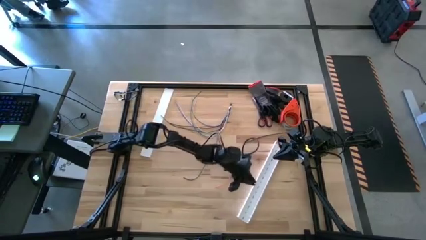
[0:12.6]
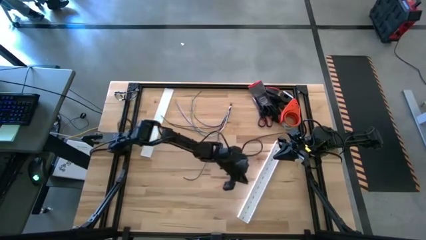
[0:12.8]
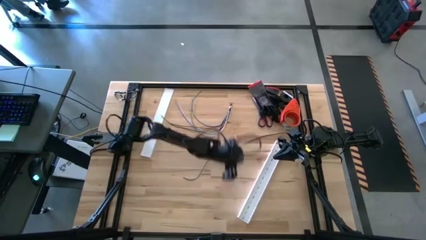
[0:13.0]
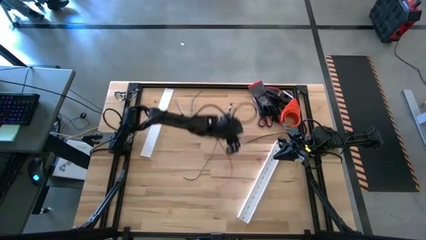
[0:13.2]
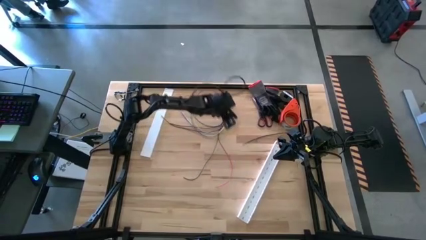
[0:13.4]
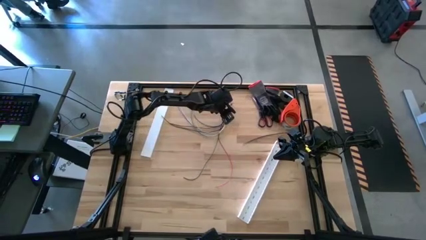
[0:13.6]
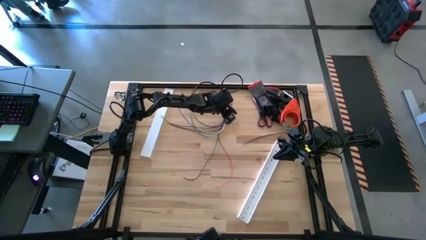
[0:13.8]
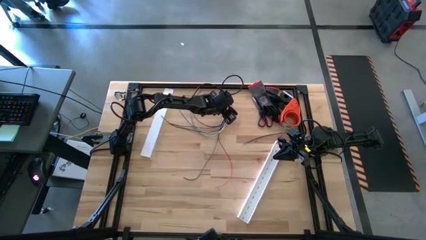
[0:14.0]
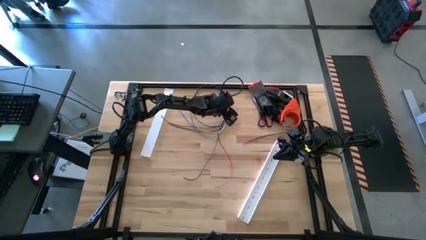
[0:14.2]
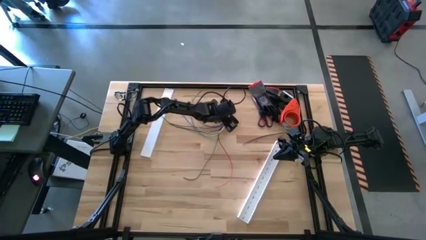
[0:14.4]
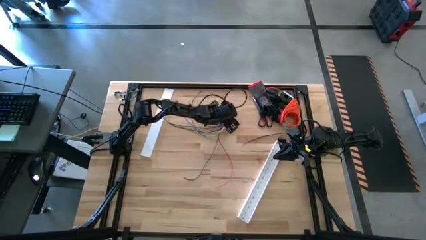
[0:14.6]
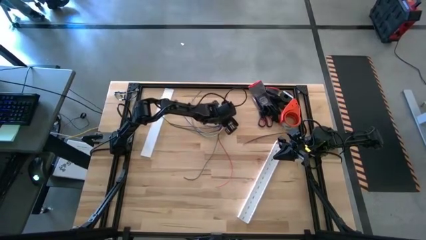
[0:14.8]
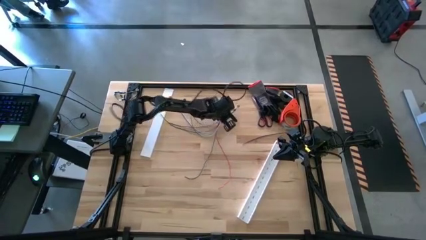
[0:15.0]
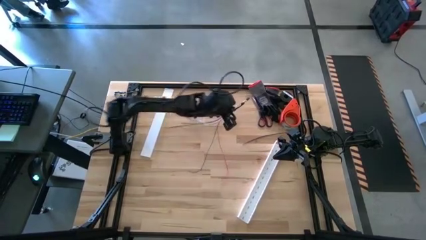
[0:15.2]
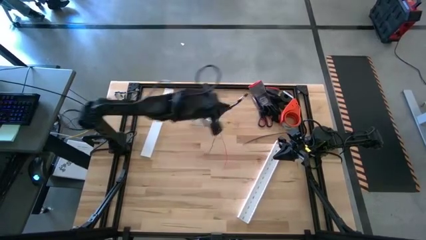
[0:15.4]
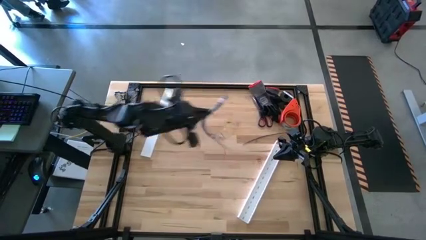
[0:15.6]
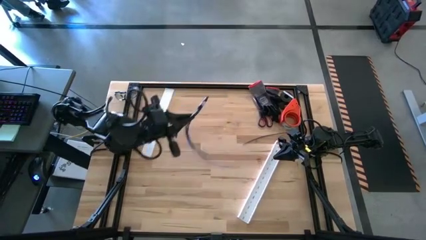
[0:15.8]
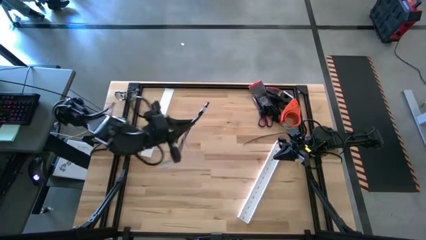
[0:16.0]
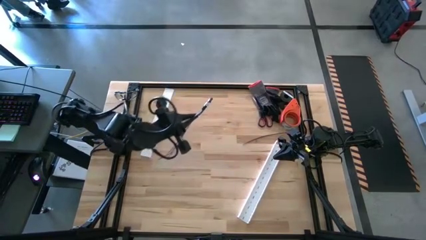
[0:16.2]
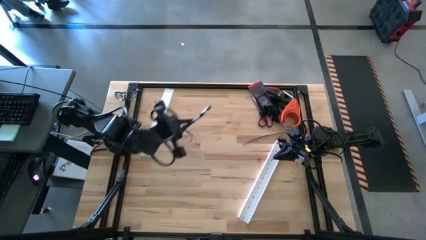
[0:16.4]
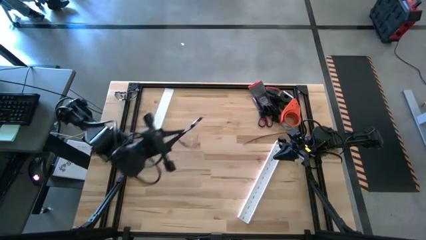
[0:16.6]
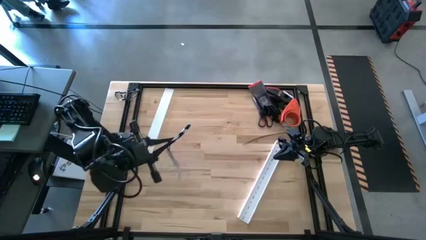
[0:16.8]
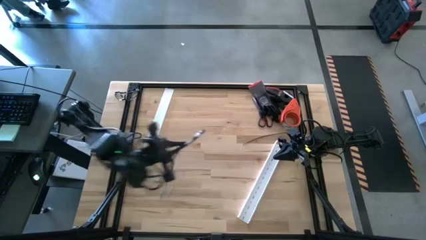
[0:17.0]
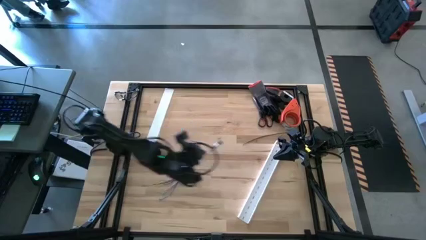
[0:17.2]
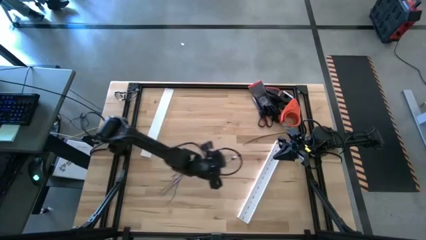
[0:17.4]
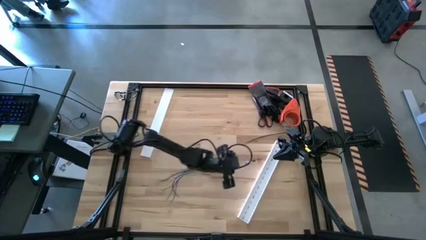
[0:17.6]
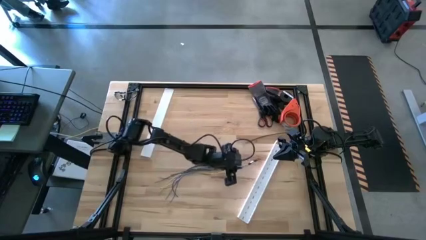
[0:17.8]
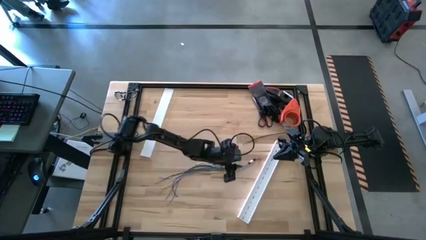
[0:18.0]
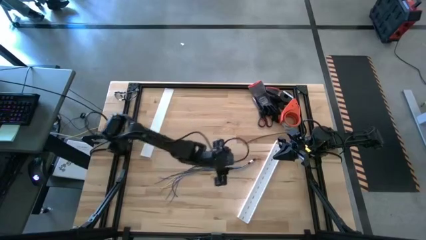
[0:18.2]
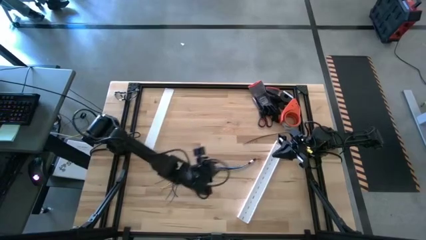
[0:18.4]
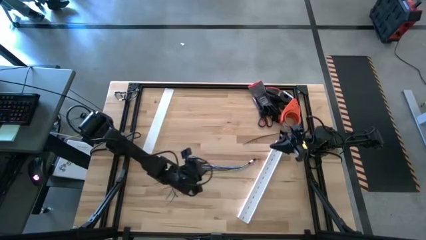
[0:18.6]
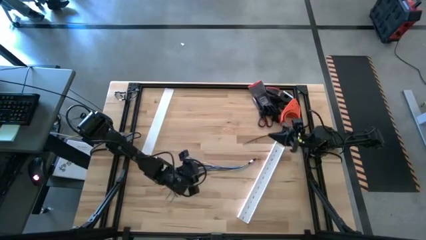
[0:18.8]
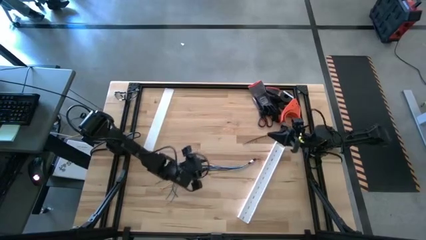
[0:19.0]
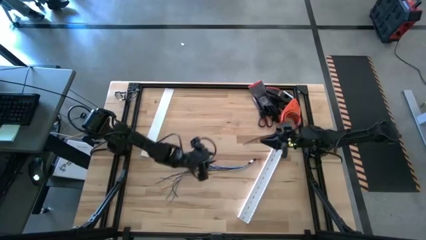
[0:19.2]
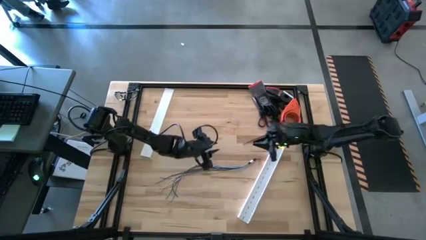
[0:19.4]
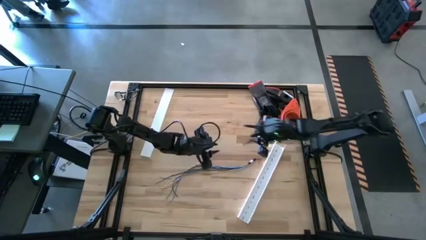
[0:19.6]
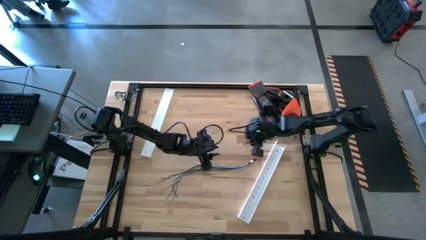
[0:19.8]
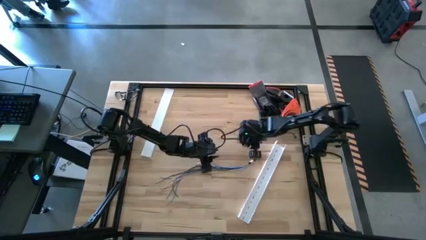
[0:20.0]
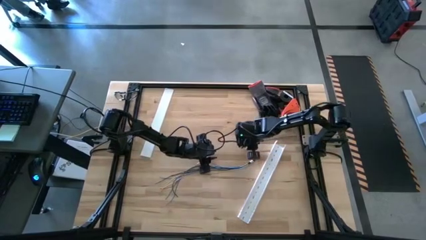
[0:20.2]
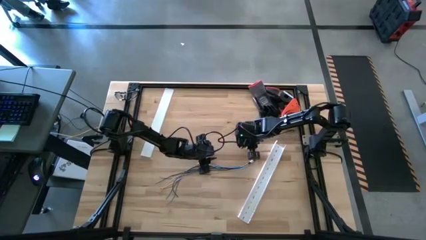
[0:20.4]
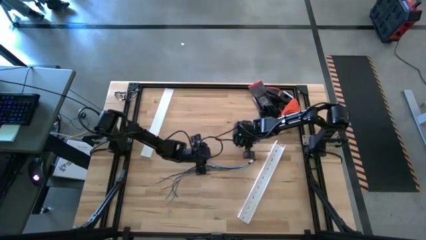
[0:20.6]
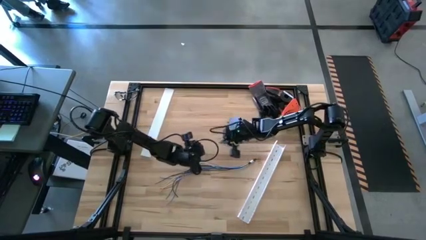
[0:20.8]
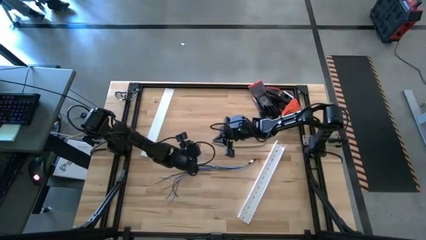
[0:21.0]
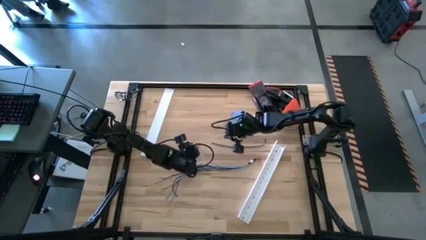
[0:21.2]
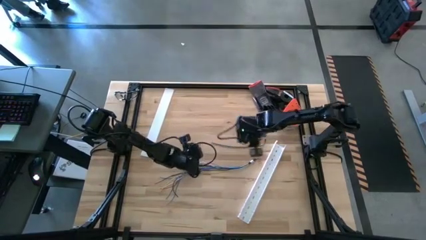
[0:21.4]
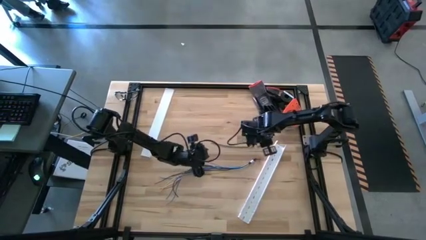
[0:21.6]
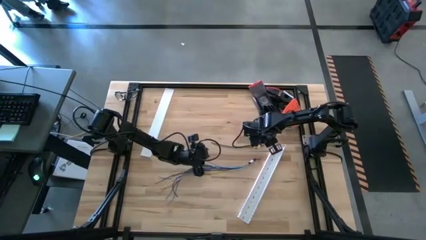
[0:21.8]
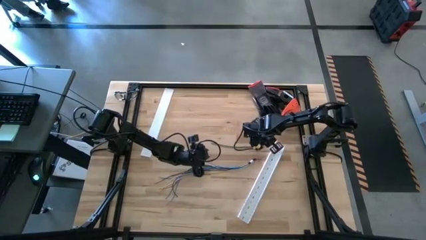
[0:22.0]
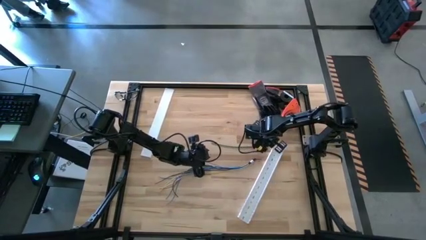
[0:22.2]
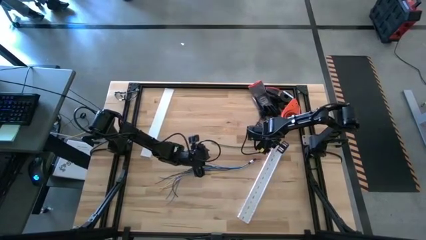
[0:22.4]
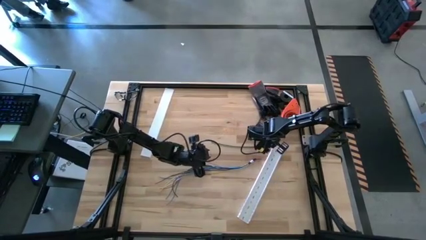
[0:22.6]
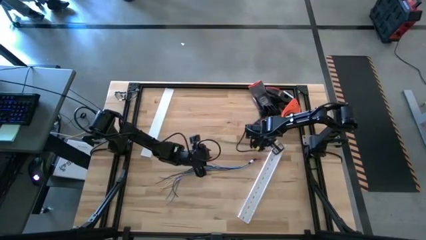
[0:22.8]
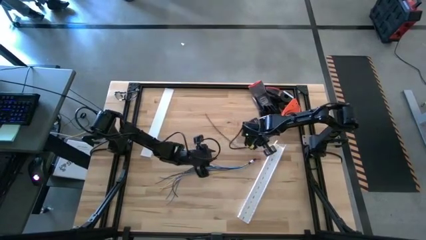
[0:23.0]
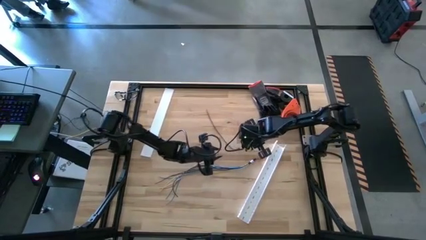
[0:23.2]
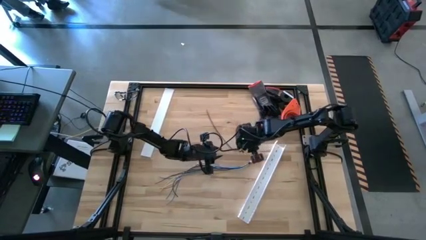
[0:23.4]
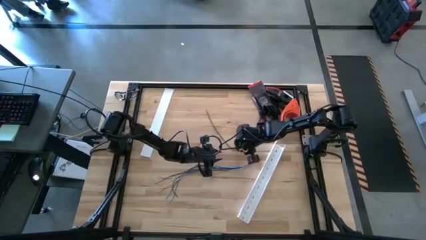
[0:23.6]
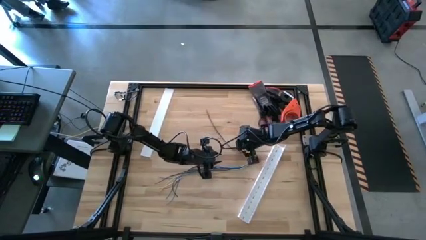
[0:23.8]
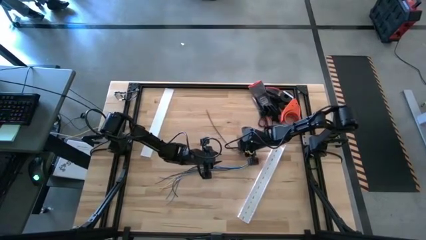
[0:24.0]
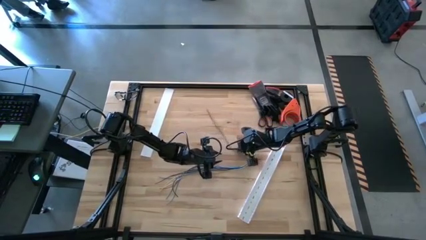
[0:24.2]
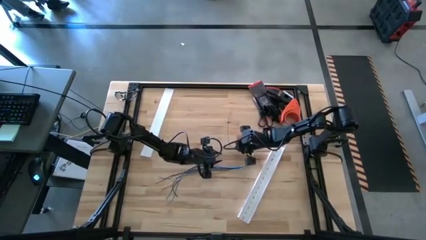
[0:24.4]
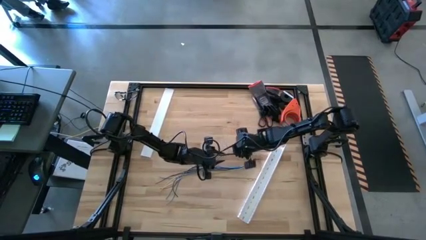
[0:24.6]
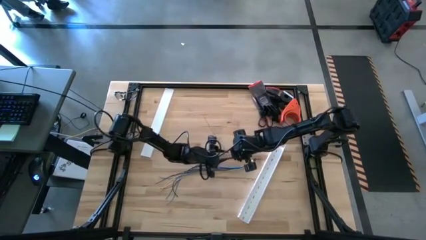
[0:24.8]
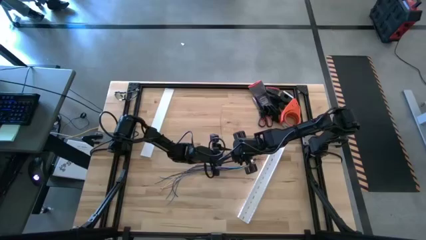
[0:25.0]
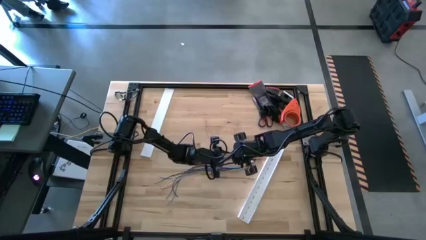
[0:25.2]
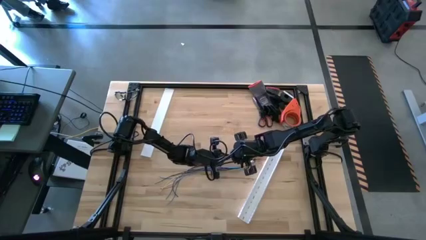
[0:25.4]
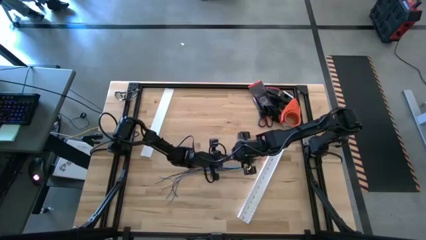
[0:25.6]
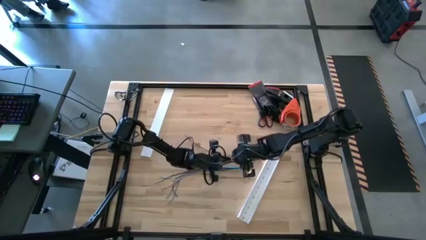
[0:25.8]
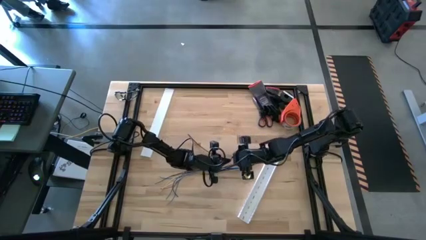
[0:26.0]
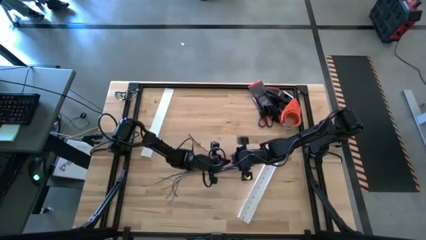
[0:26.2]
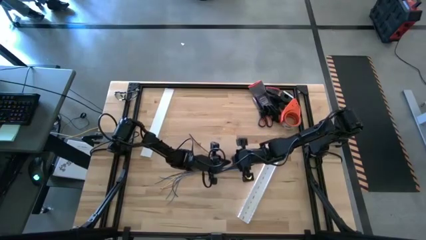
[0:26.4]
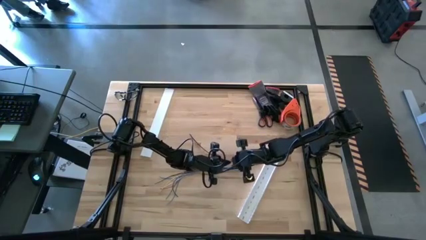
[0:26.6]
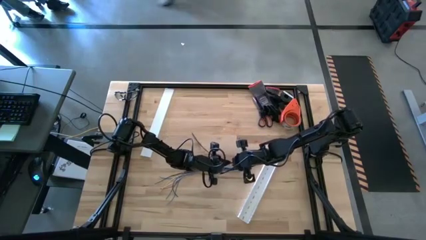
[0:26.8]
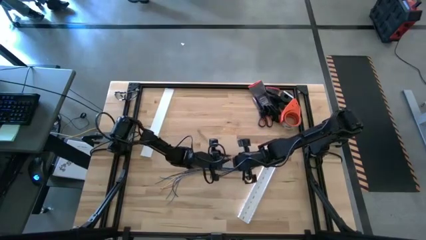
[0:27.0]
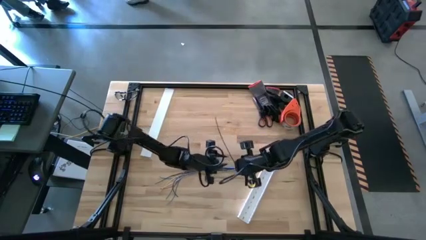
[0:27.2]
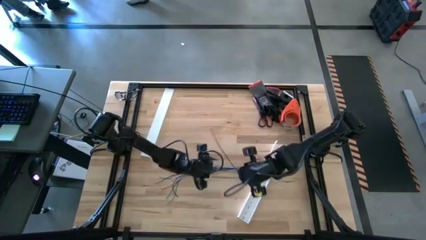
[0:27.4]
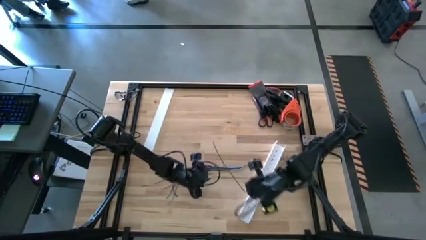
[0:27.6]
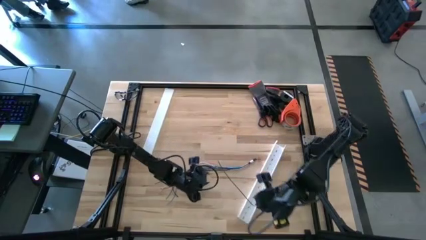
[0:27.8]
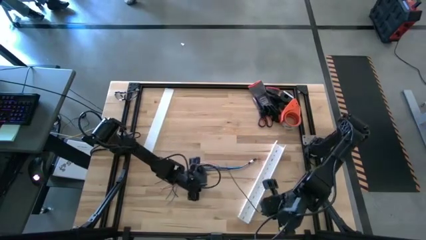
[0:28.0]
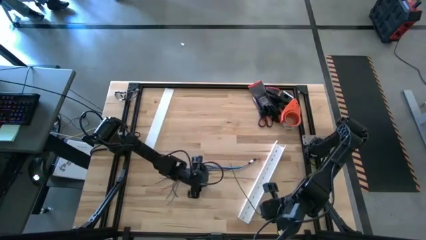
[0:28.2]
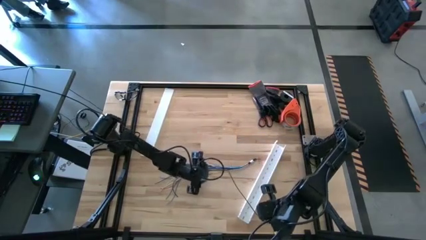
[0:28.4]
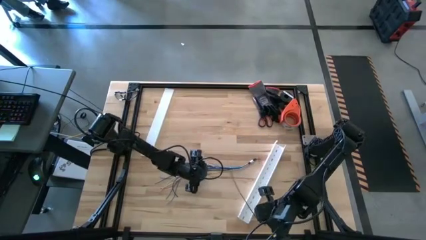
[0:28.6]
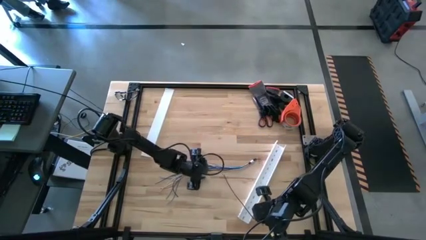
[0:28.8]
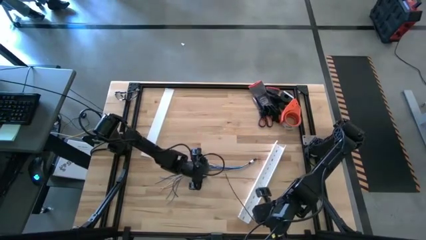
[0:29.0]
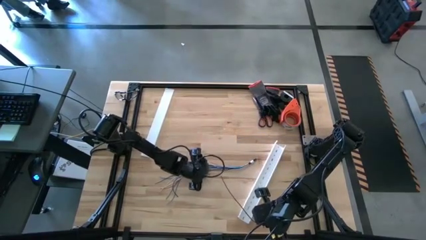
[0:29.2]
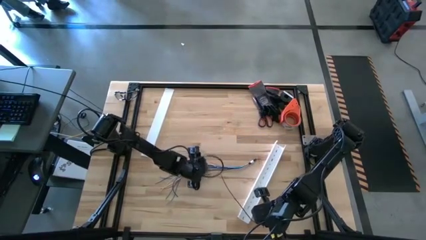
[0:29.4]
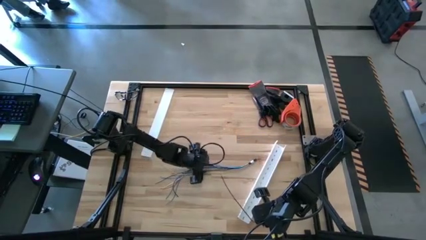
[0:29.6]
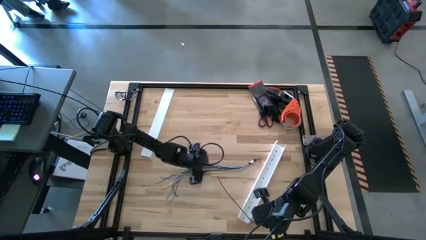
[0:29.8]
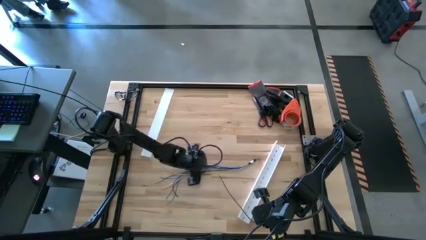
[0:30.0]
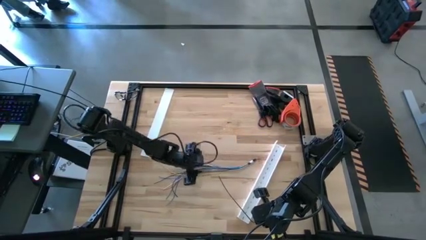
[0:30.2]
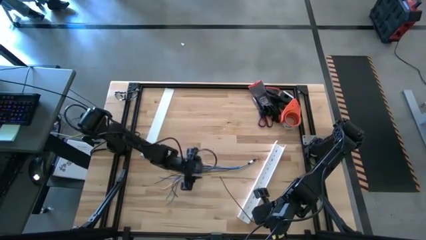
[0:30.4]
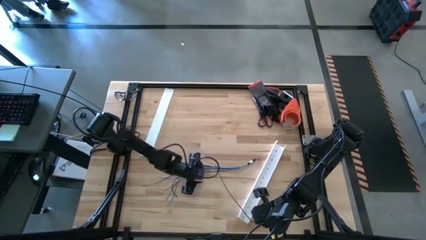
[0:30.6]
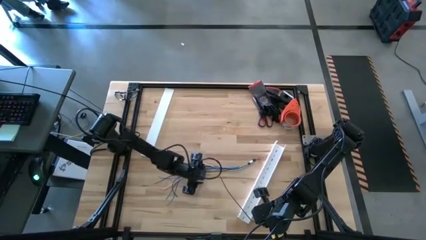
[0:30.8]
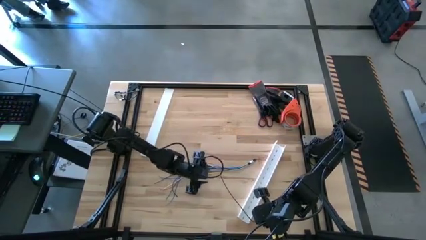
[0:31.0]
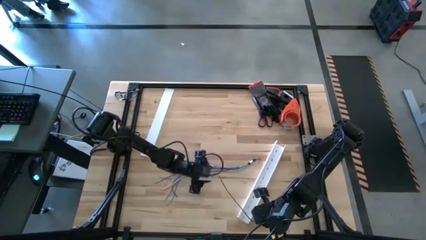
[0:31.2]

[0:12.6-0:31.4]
Task: Ziptie cables
Wrap the colored cables with the black zip tie
